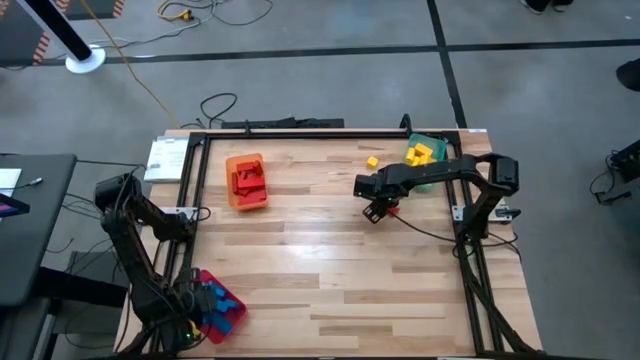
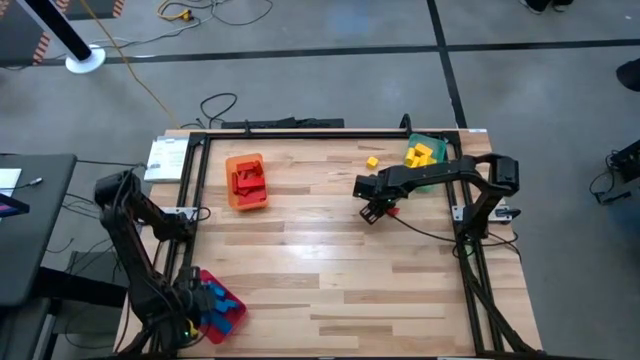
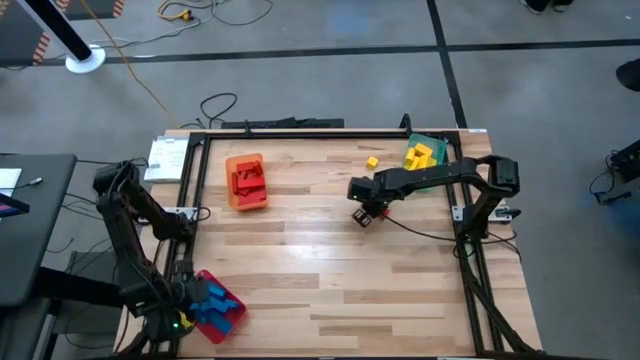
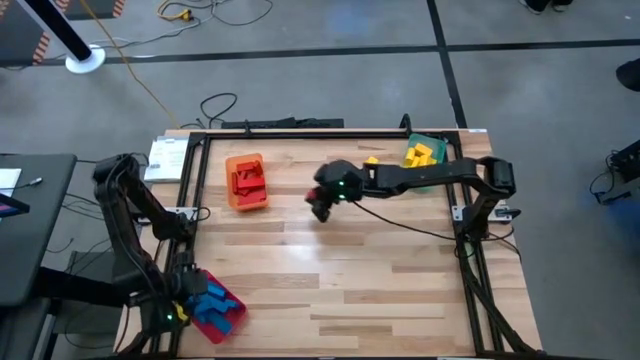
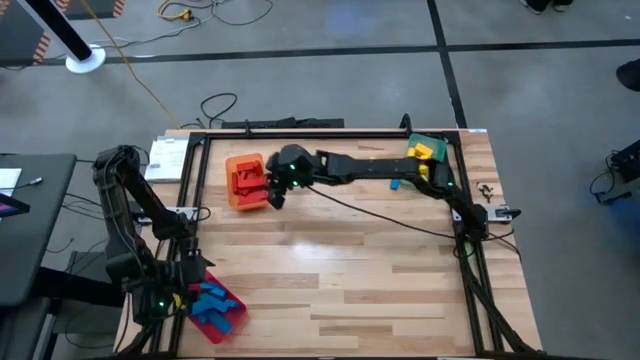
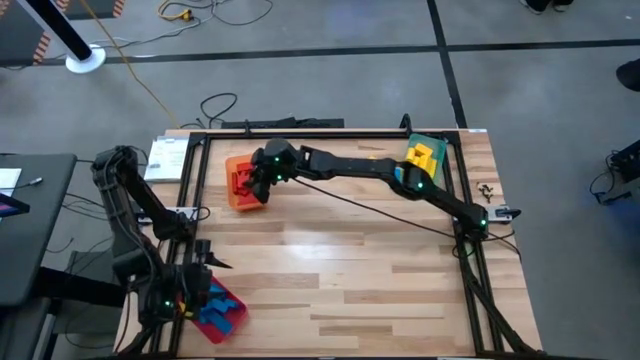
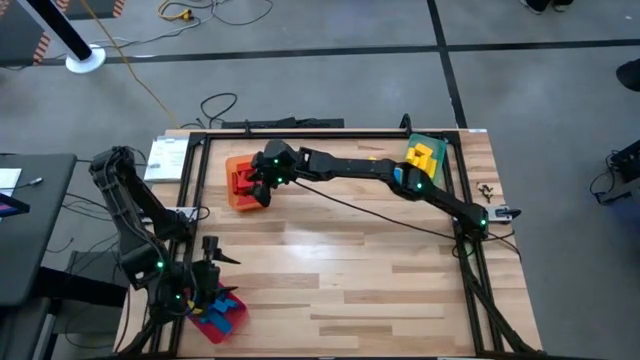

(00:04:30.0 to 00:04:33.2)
Task: Sort blocks
Put the red wooden block into the orange bin

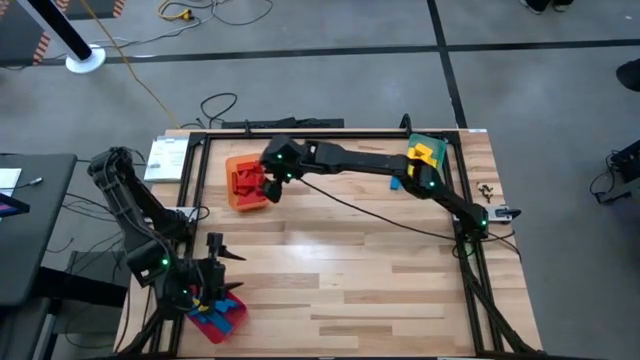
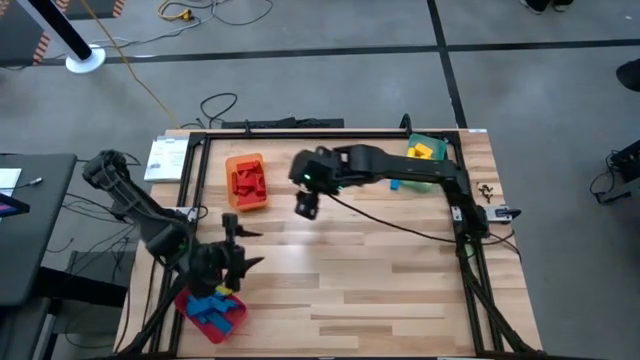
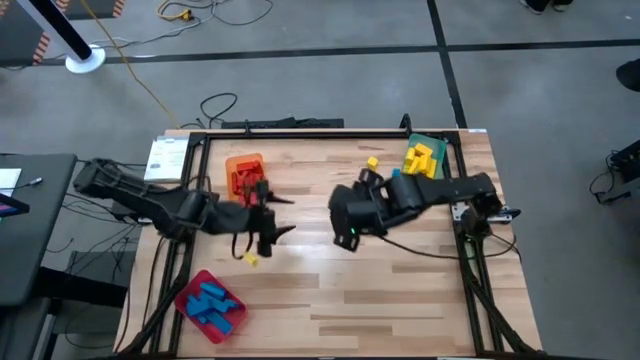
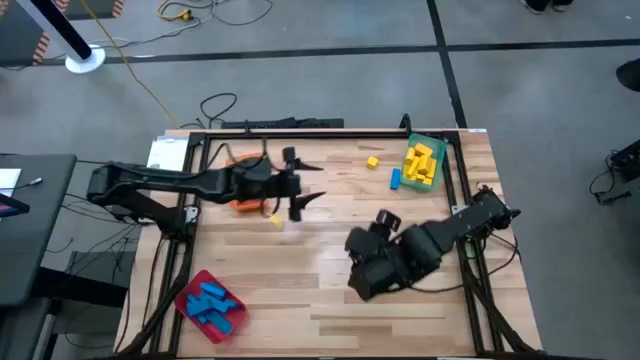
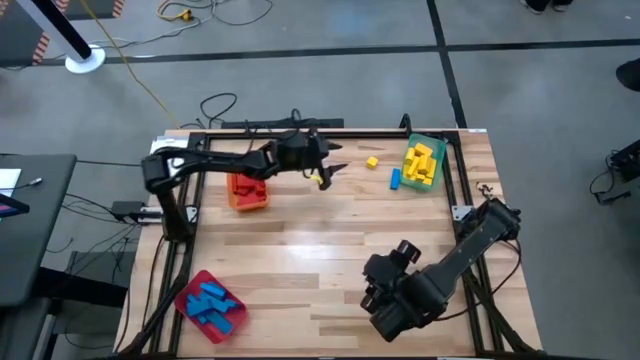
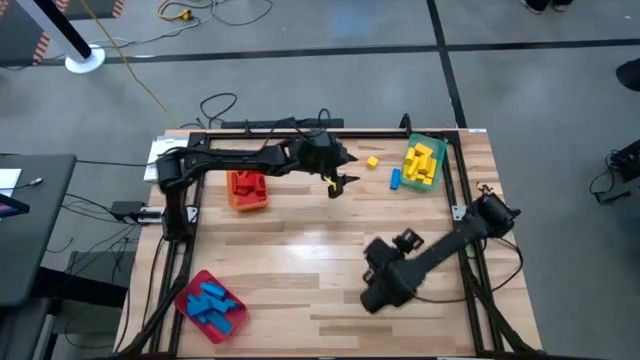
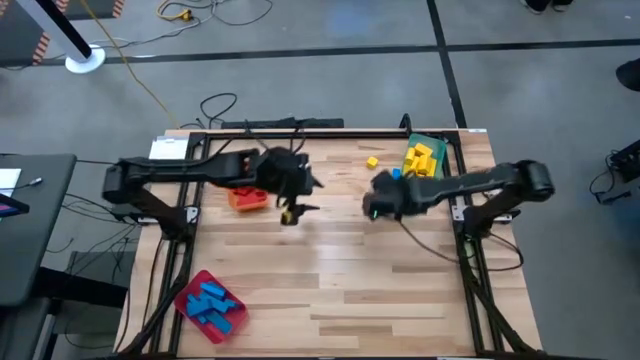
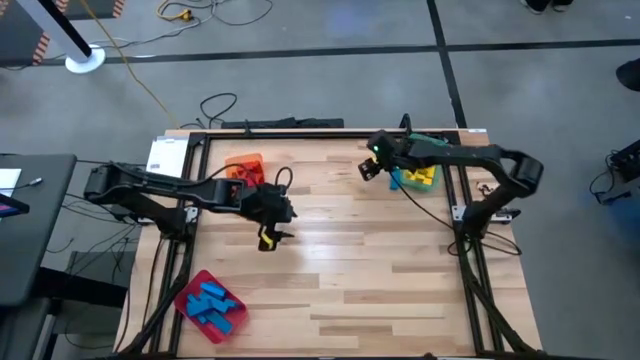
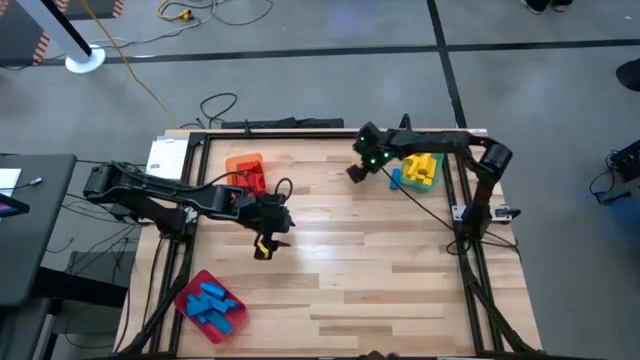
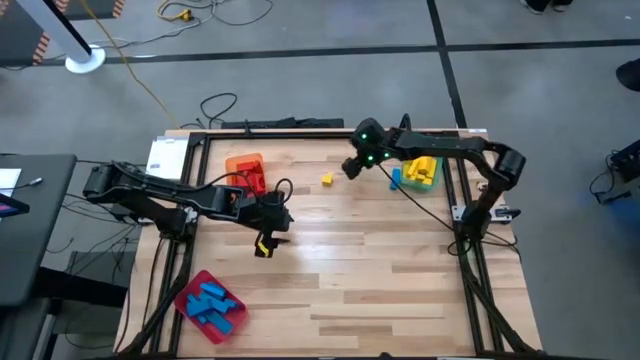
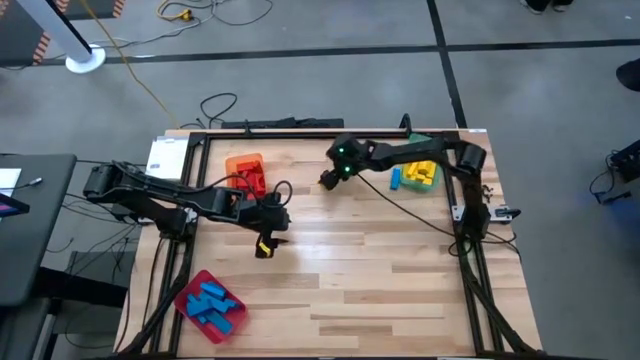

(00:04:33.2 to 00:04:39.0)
Move the yellow wooden block to the middle left of the table

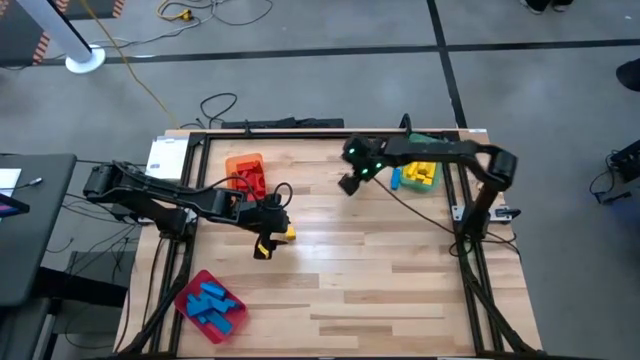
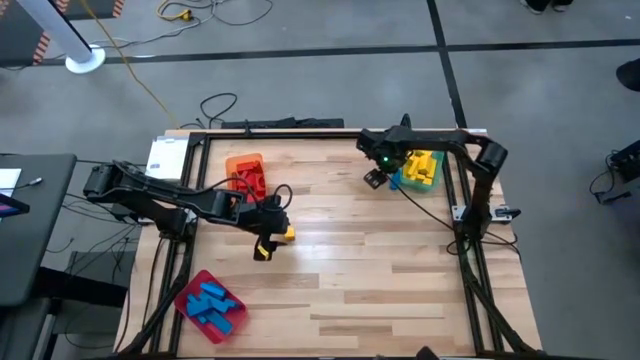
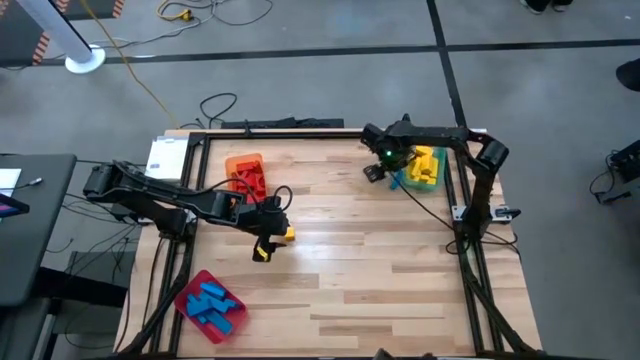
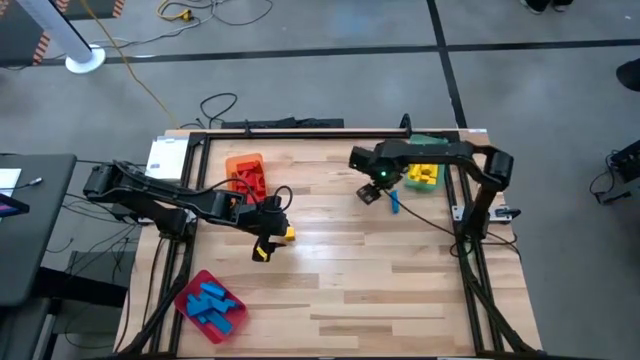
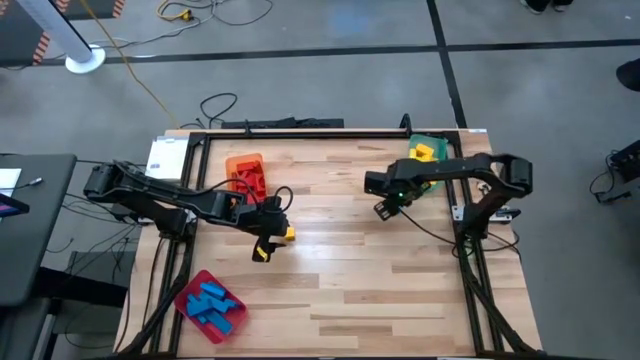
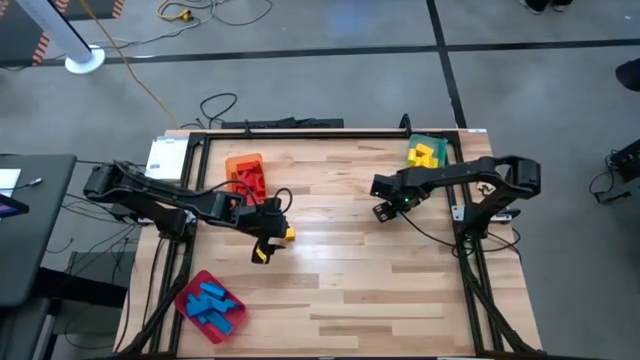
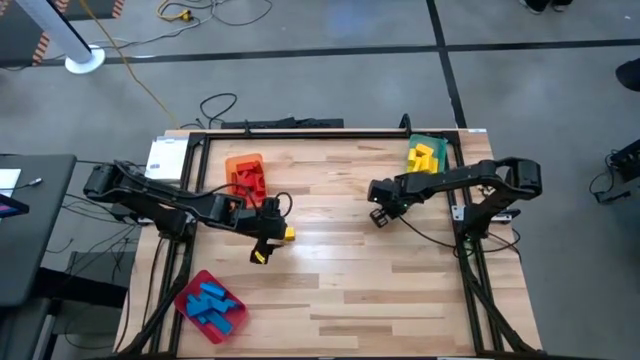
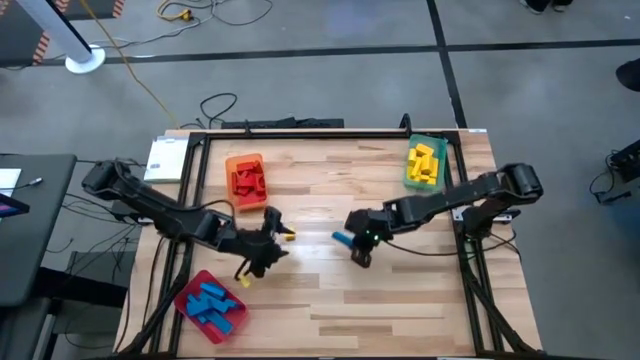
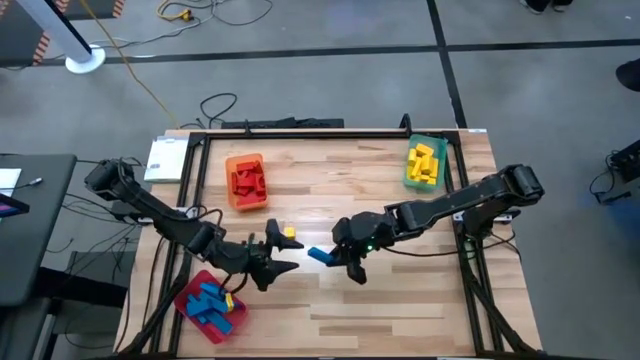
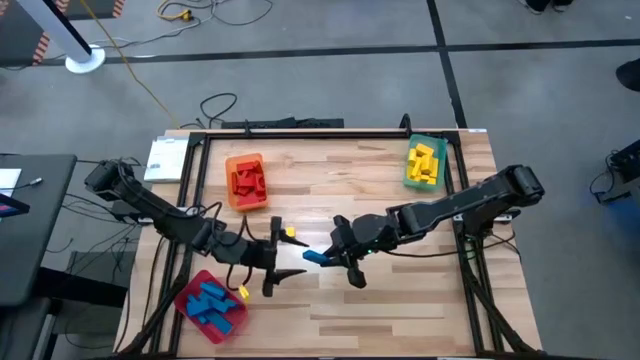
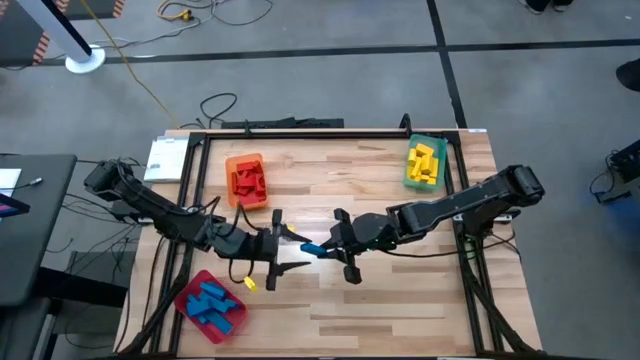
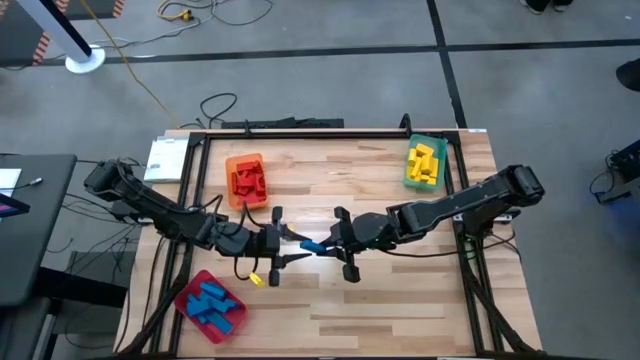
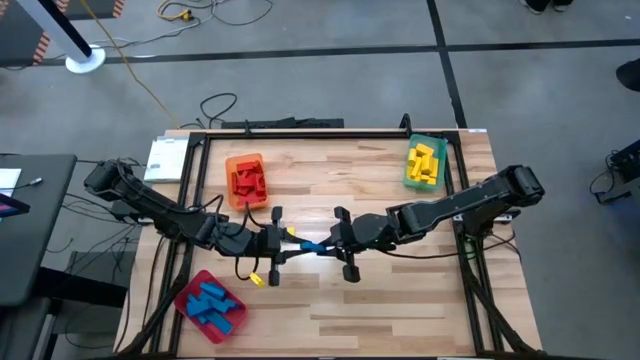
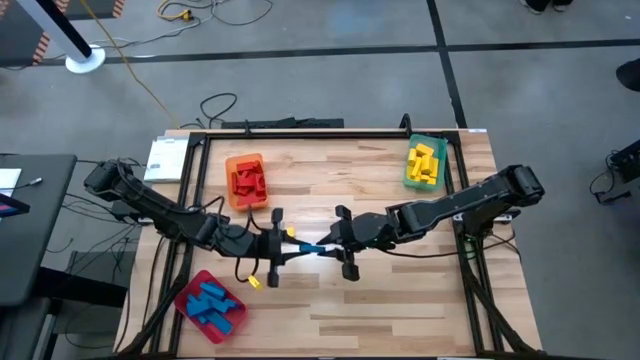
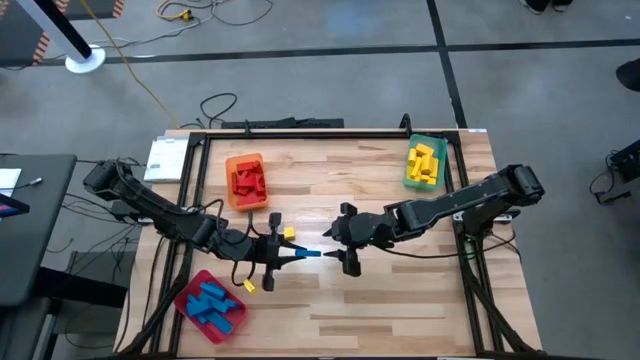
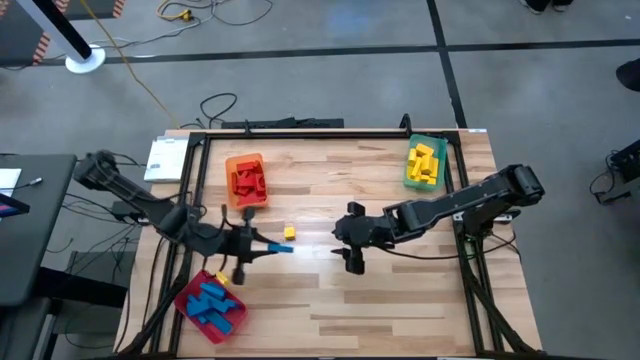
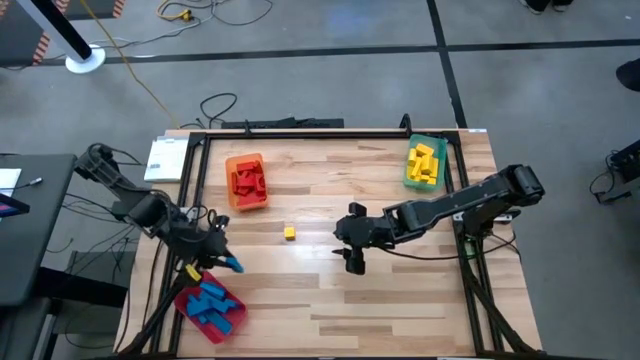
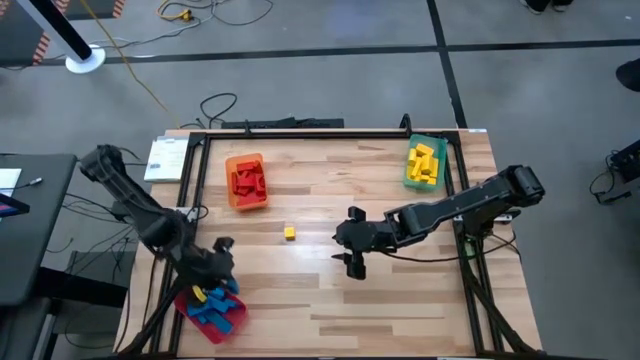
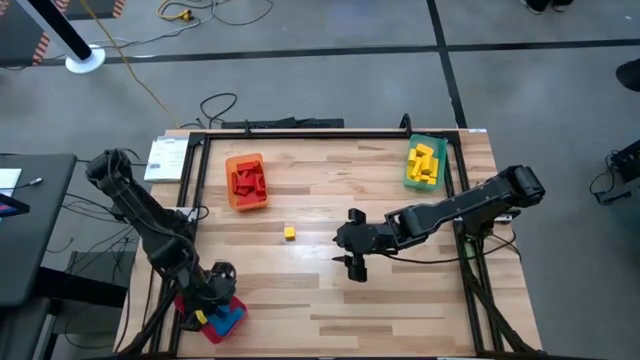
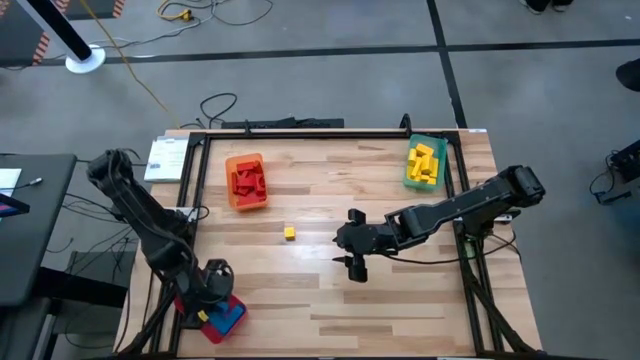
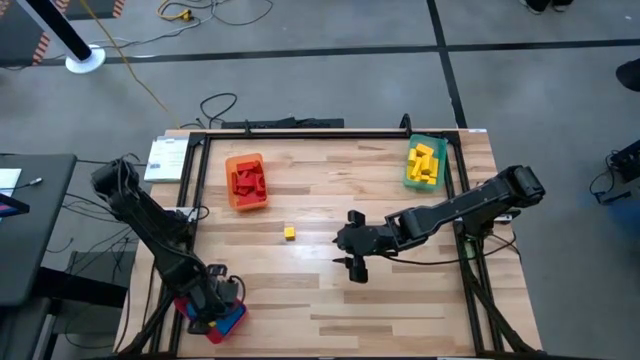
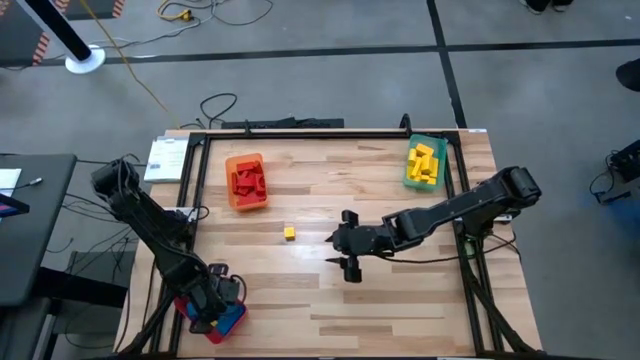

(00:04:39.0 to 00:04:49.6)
Put the blue wooden block into the red bin
